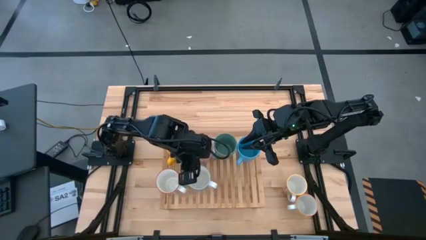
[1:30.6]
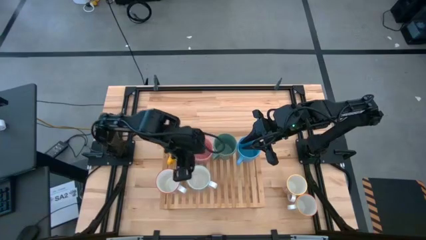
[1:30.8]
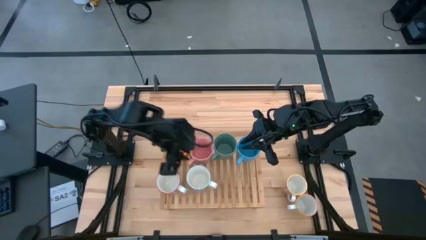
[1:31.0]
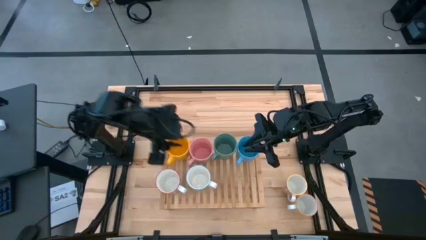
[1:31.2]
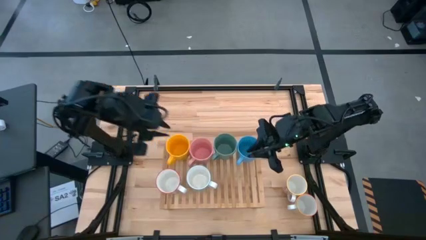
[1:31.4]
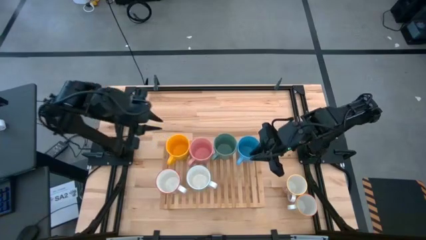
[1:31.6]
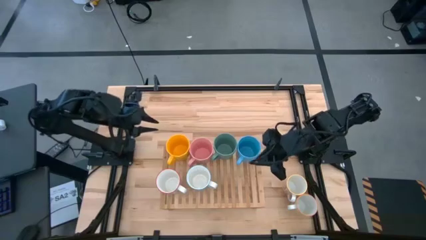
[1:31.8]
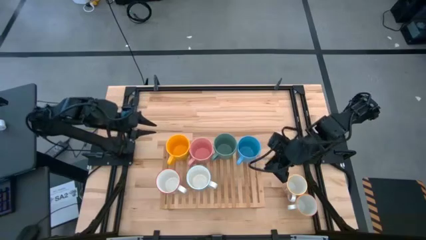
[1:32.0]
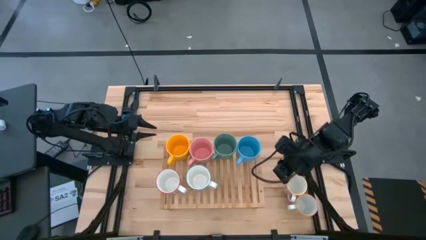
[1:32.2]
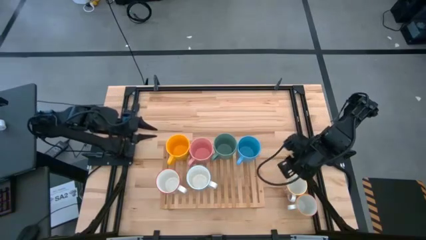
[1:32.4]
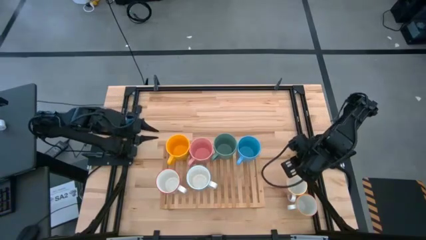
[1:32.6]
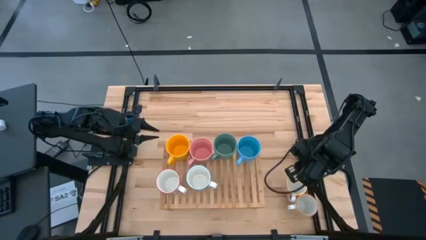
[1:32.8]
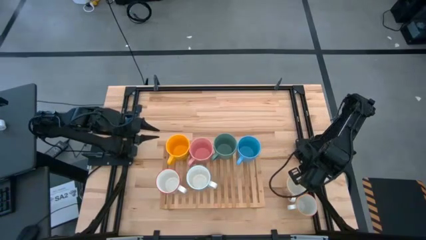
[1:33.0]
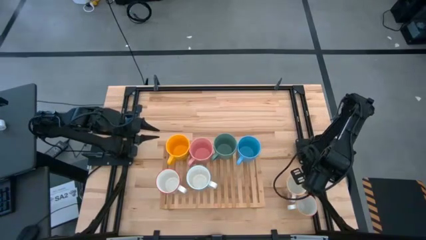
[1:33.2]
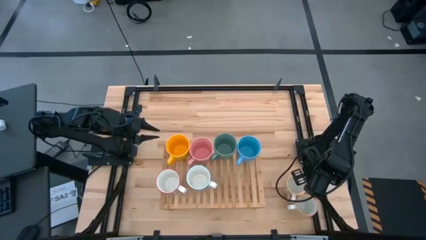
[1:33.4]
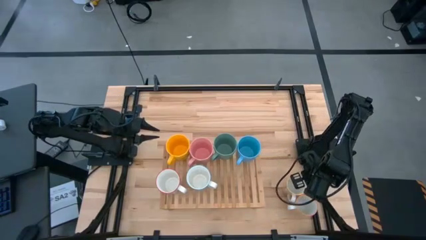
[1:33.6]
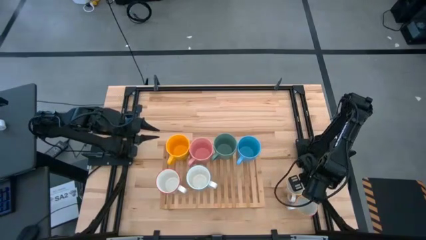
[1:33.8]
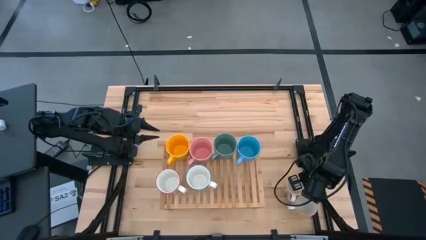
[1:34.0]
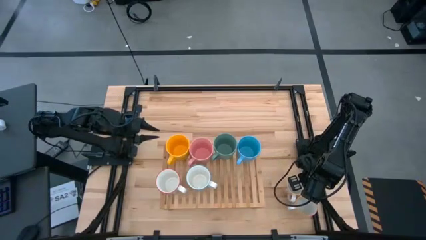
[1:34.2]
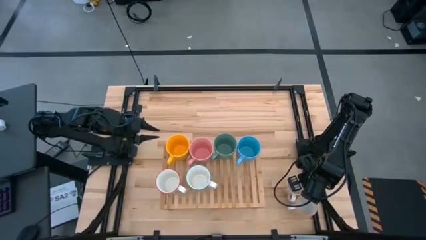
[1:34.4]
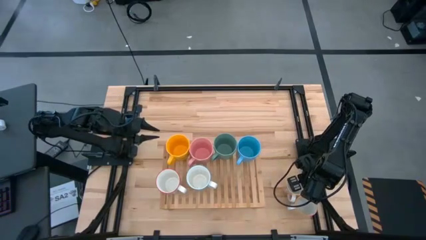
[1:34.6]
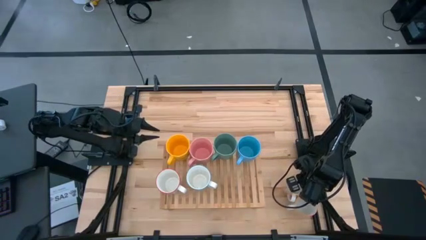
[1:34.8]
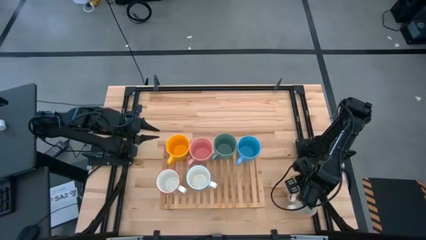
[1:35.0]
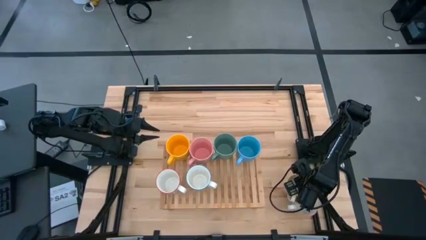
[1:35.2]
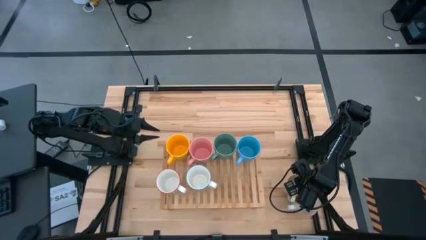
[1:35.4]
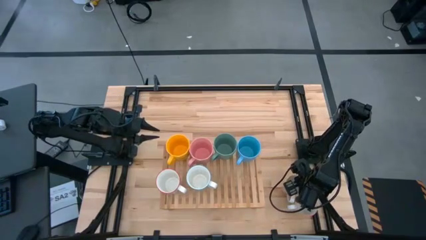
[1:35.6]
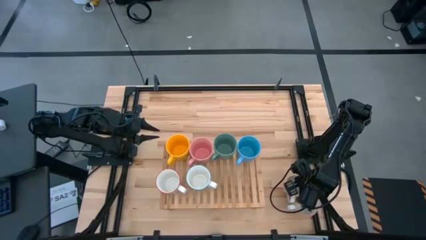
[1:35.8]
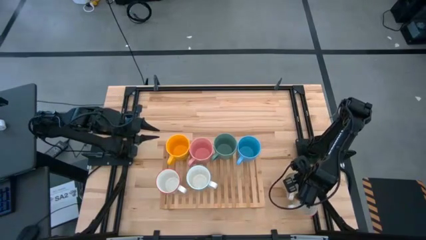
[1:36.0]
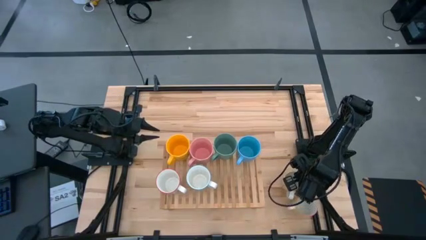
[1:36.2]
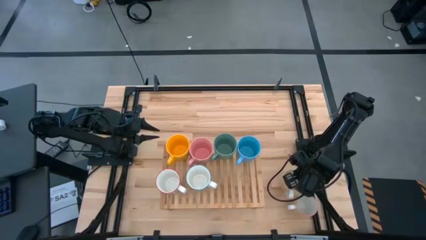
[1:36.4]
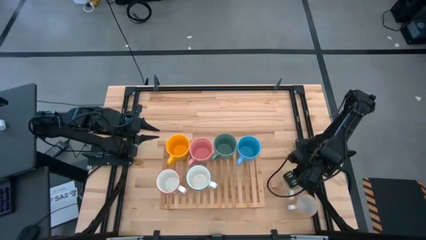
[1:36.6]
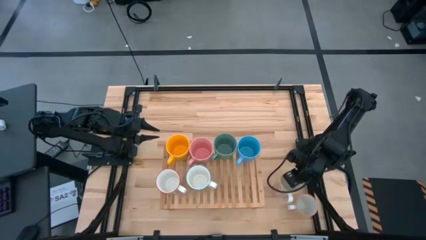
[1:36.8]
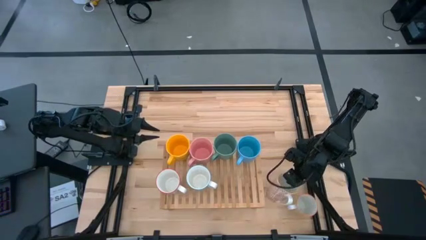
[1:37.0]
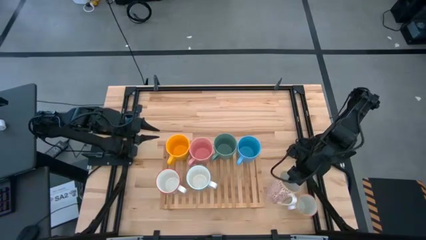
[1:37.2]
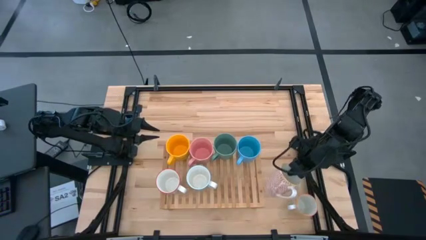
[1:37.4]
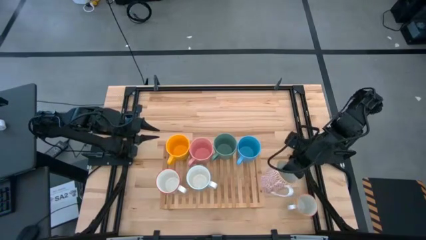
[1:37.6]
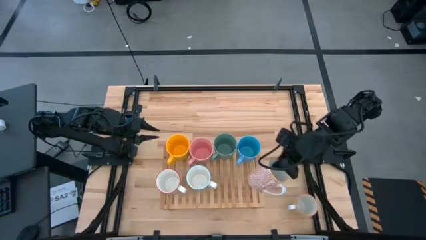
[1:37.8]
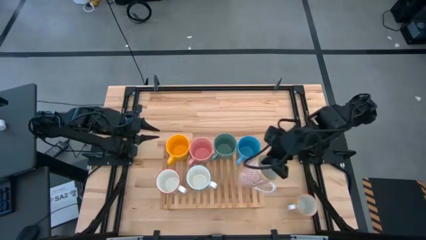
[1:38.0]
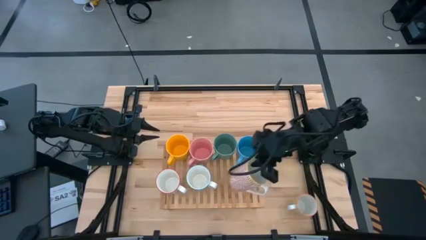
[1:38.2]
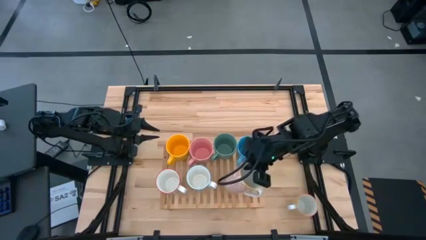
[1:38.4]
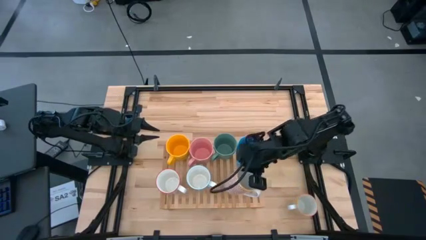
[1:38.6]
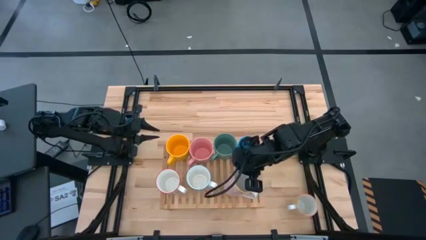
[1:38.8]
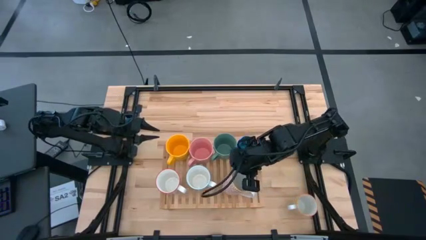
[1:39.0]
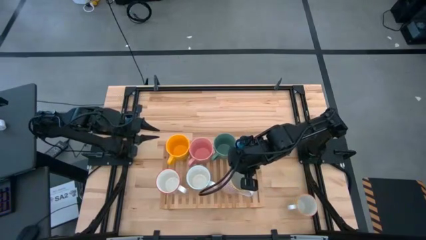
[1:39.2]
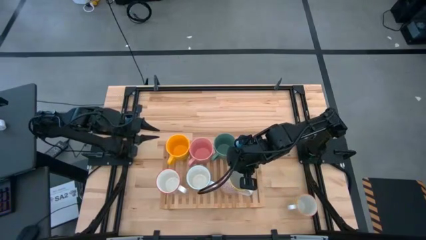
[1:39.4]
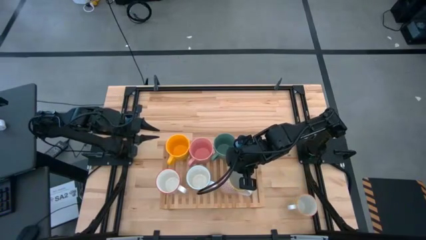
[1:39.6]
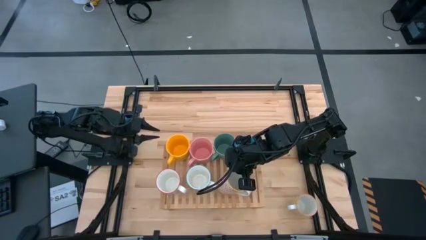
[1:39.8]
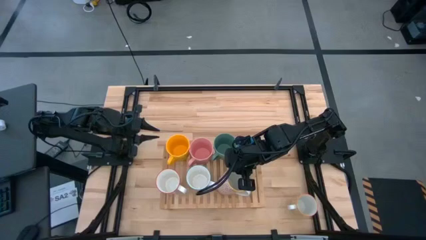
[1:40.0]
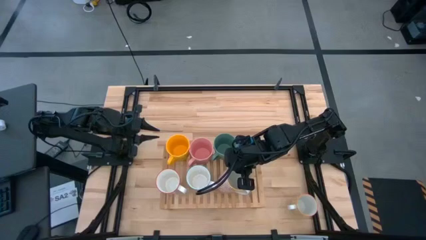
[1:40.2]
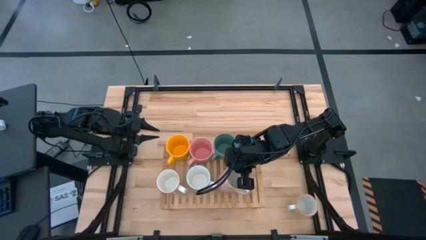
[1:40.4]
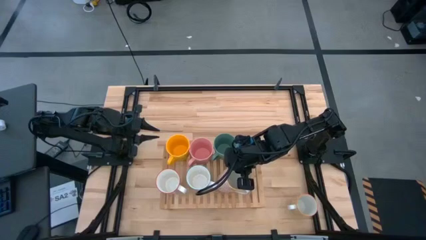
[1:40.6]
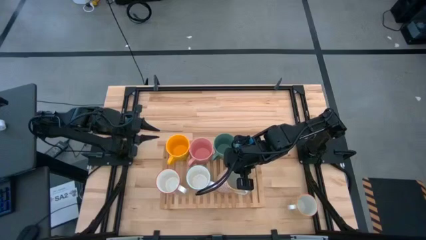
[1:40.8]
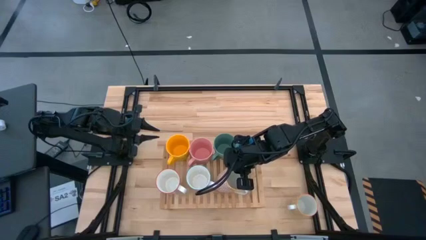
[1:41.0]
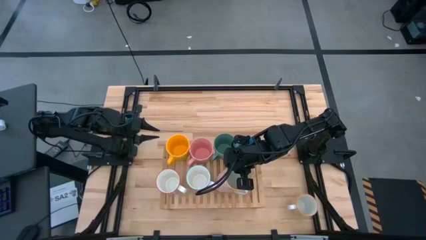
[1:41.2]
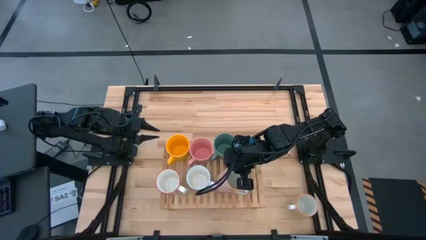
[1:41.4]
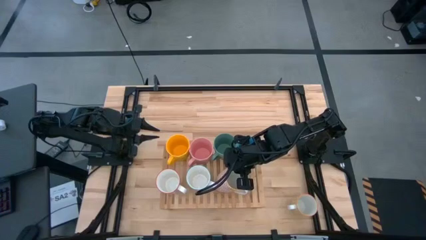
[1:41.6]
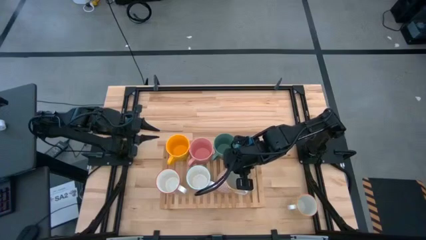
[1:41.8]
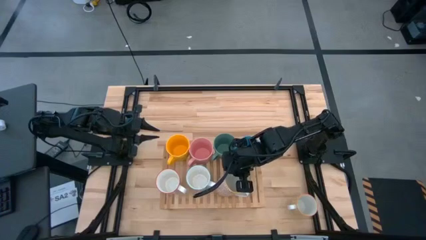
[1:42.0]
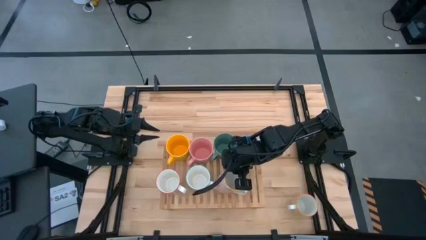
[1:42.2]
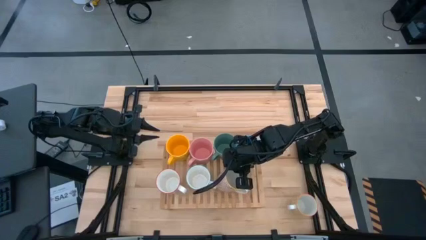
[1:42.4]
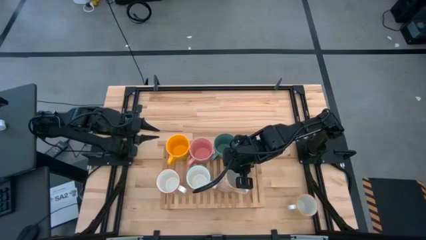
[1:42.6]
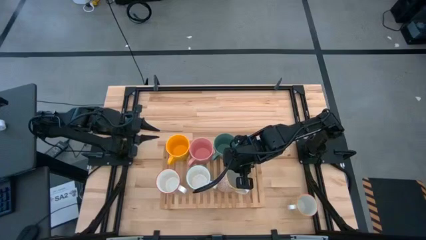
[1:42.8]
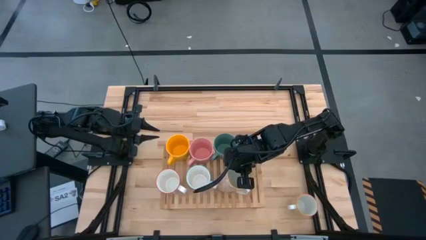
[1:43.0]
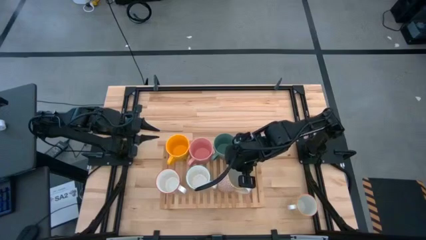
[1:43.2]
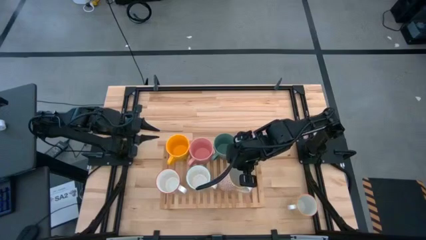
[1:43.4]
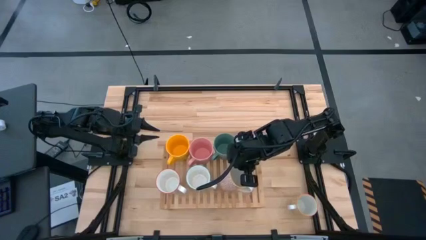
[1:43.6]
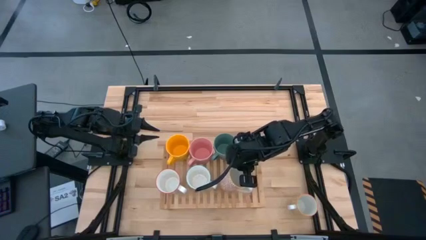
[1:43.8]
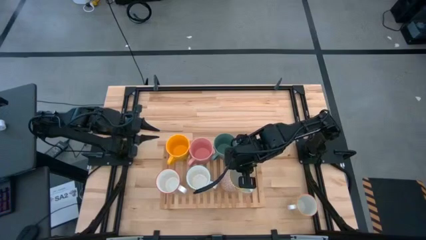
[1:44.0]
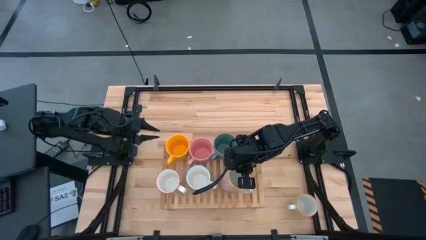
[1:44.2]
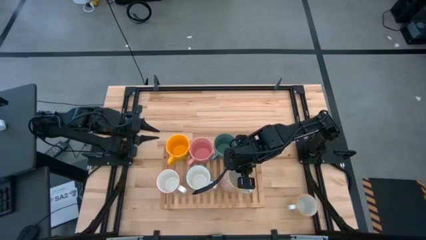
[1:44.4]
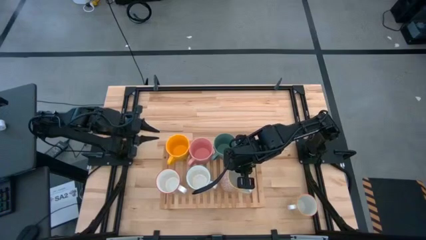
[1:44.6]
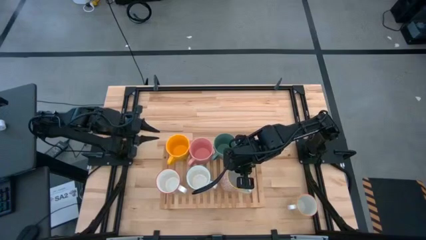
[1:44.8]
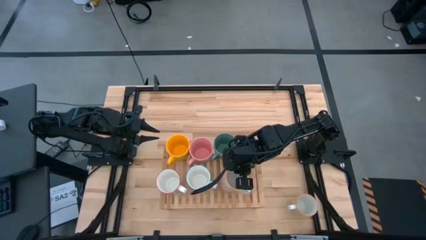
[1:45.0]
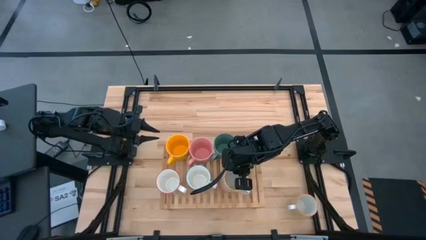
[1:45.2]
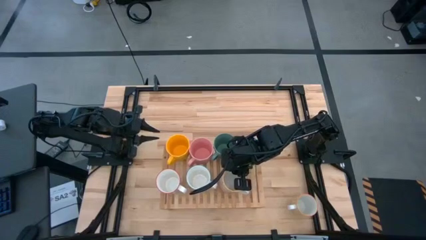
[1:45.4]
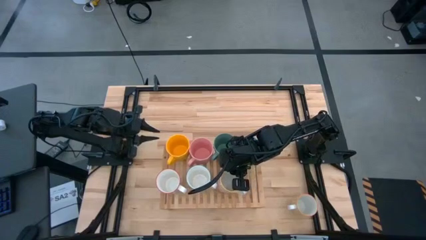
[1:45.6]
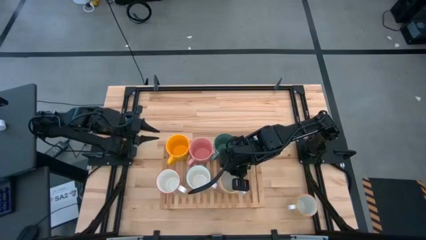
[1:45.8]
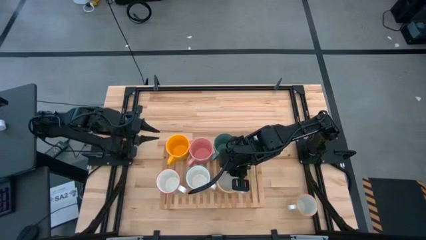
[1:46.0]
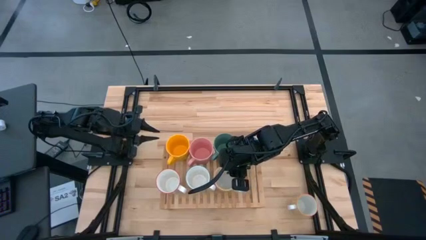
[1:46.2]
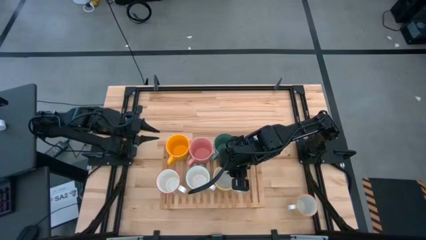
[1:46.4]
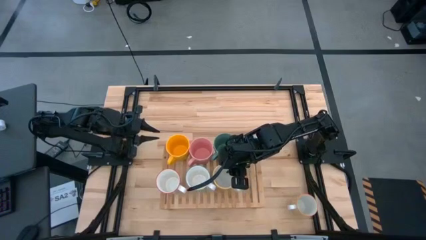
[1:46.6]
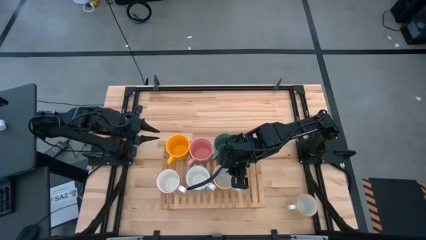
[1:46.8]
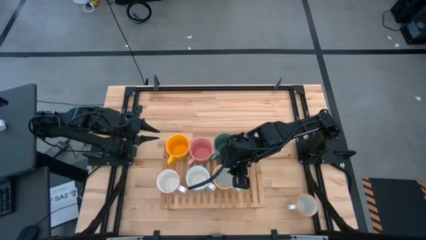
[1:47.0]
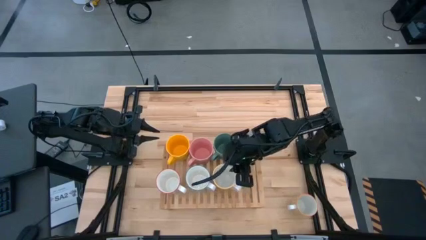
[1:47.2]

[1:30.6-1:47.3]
Task: Place coffee mugs
Put the red patterned mug on the shelf
